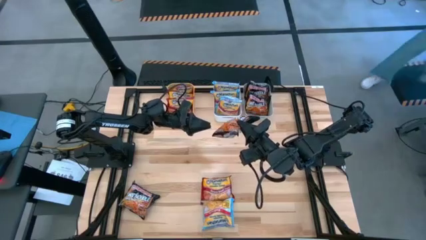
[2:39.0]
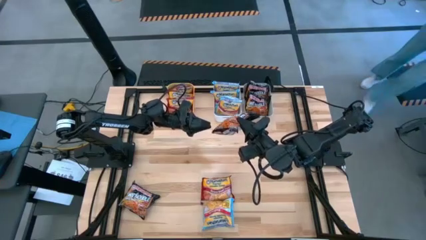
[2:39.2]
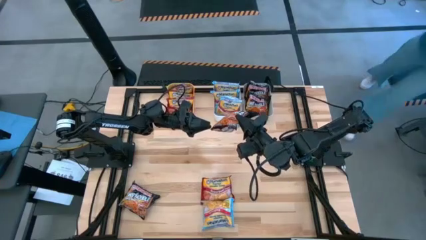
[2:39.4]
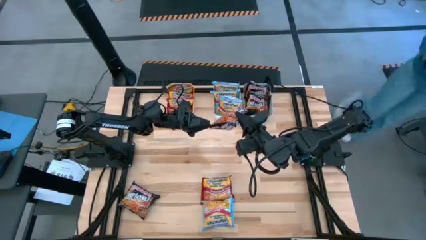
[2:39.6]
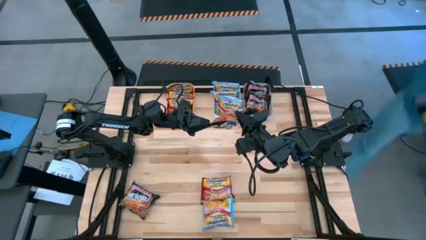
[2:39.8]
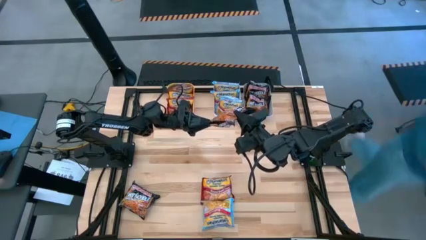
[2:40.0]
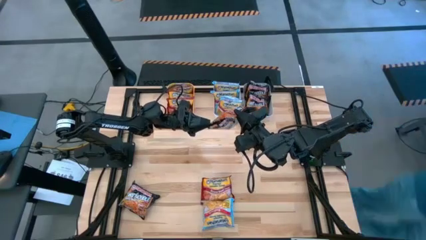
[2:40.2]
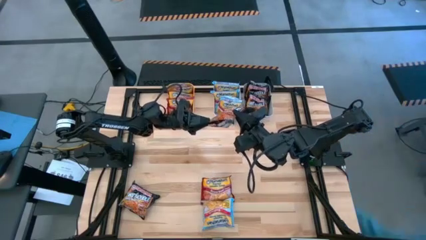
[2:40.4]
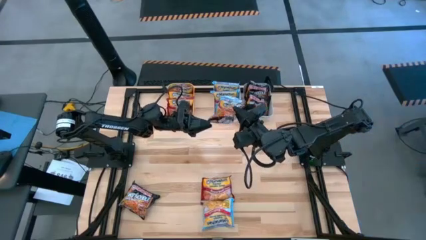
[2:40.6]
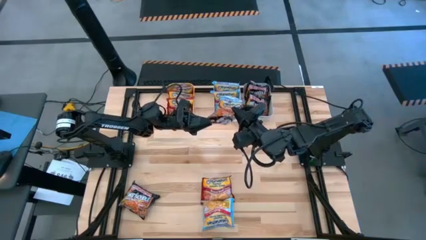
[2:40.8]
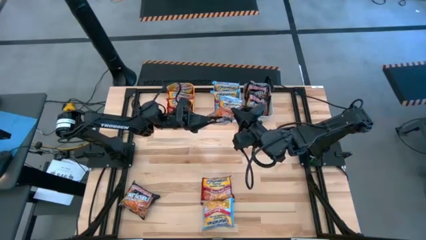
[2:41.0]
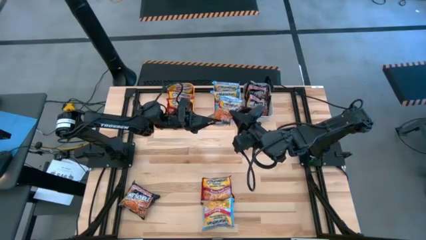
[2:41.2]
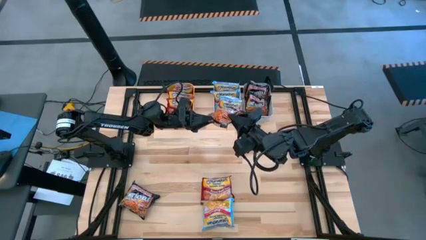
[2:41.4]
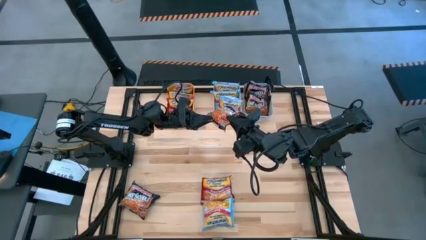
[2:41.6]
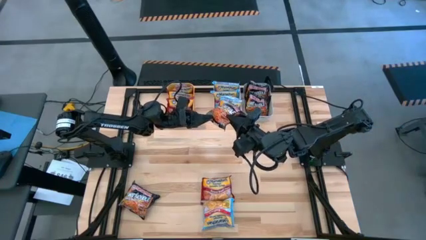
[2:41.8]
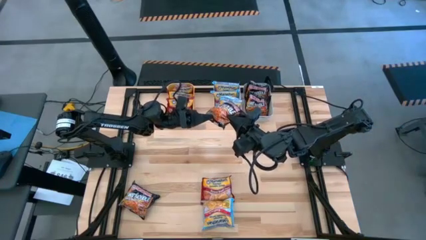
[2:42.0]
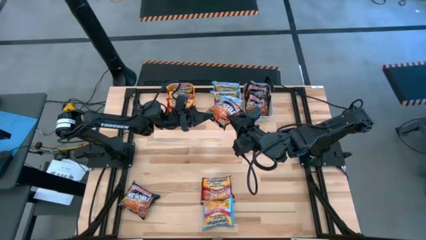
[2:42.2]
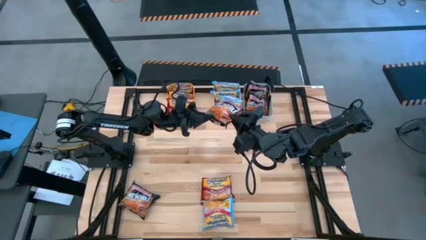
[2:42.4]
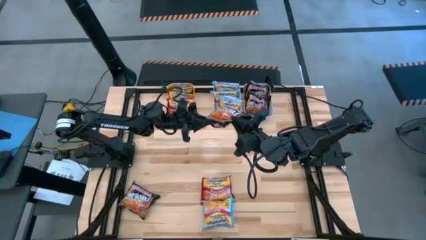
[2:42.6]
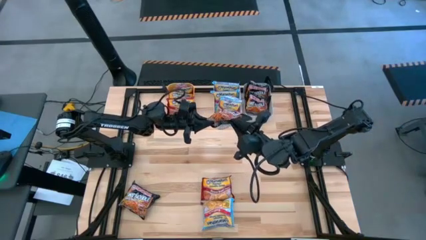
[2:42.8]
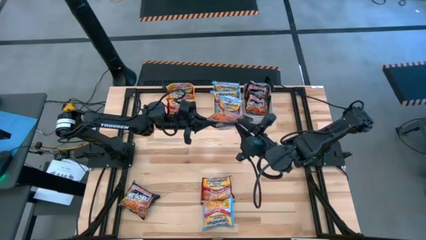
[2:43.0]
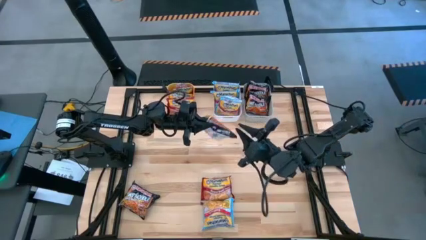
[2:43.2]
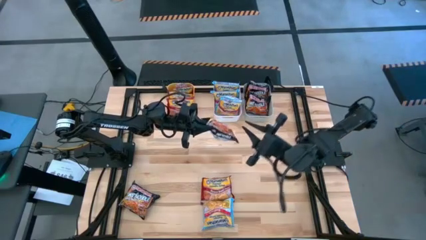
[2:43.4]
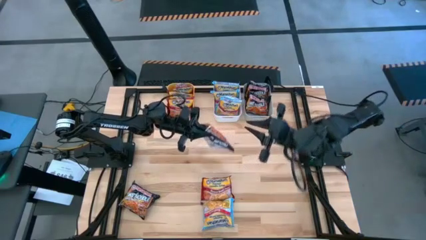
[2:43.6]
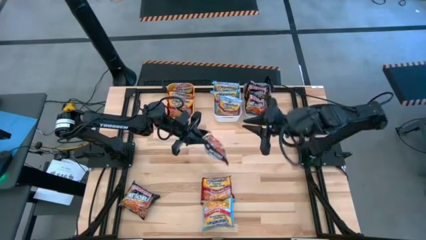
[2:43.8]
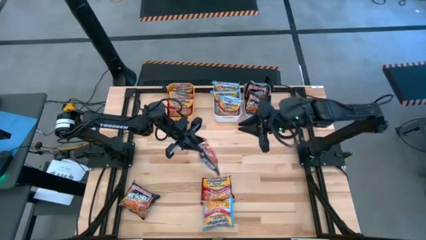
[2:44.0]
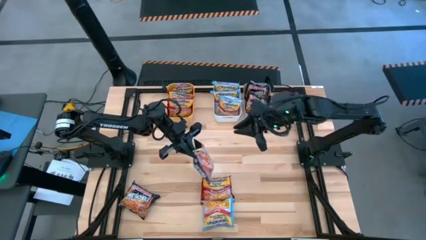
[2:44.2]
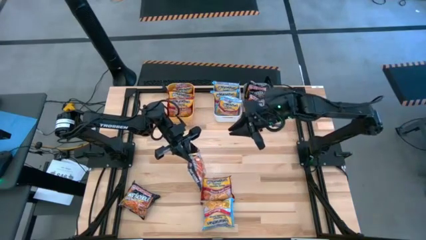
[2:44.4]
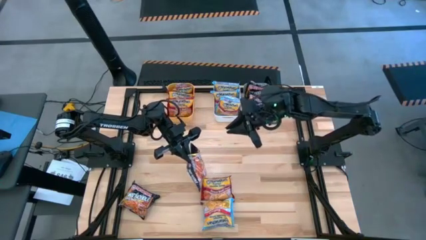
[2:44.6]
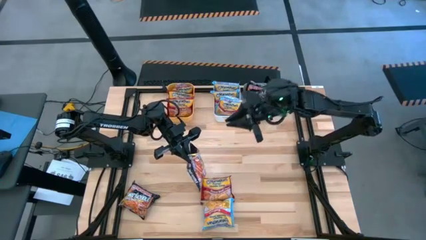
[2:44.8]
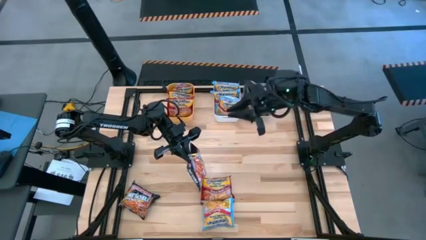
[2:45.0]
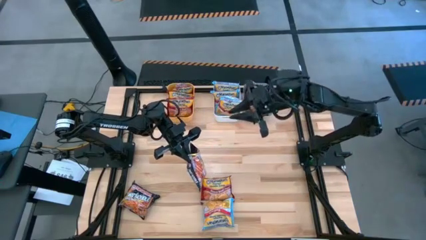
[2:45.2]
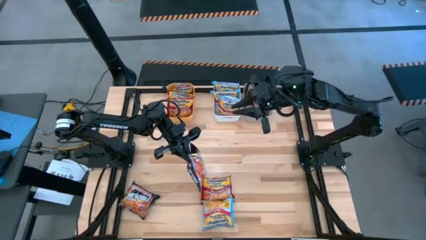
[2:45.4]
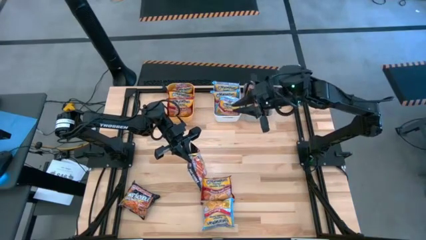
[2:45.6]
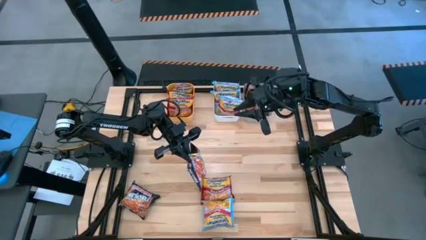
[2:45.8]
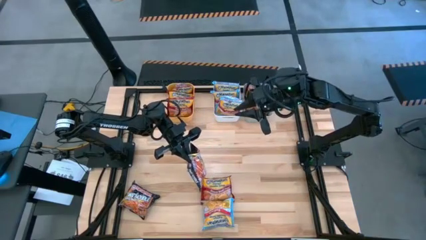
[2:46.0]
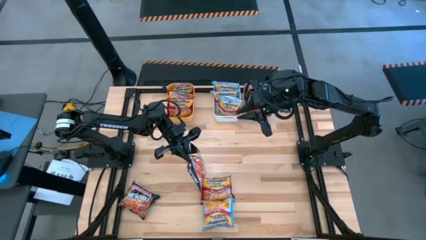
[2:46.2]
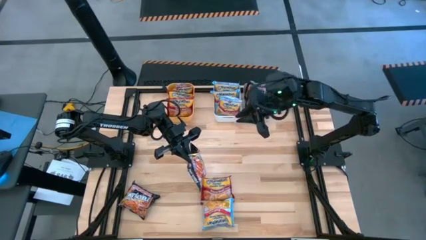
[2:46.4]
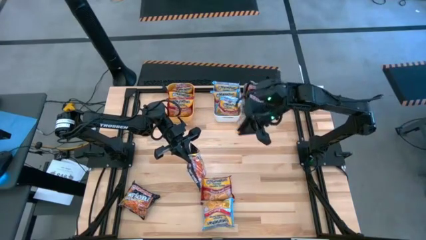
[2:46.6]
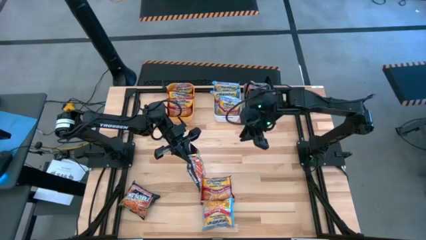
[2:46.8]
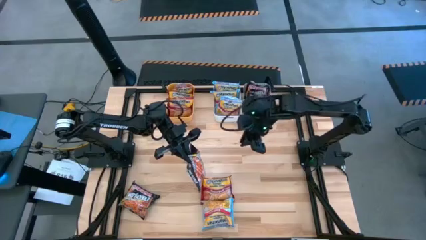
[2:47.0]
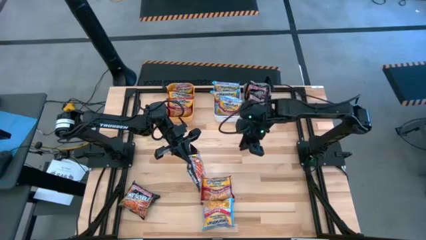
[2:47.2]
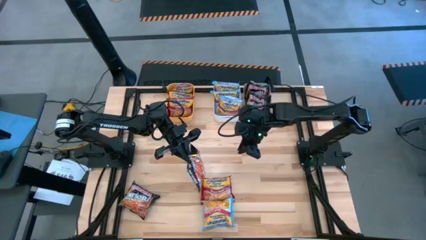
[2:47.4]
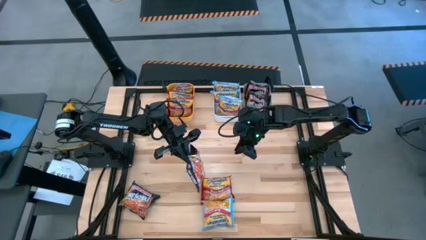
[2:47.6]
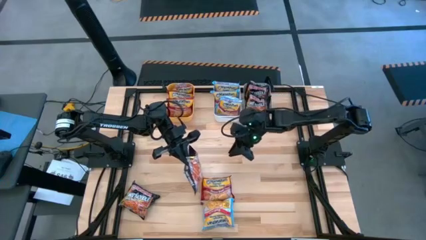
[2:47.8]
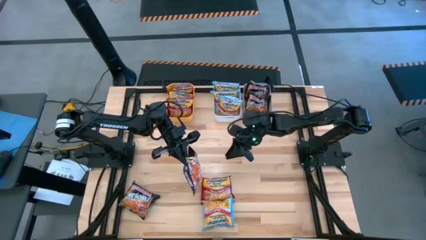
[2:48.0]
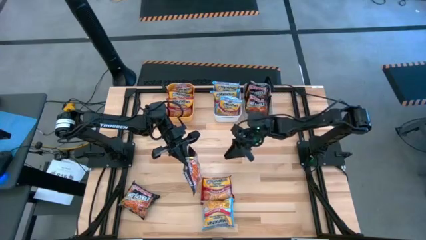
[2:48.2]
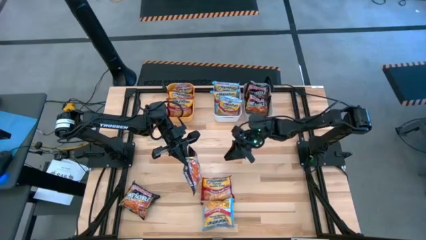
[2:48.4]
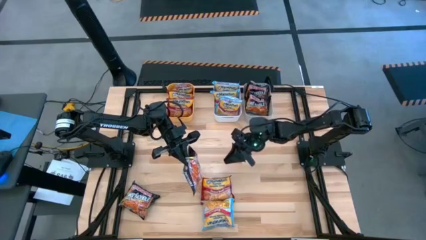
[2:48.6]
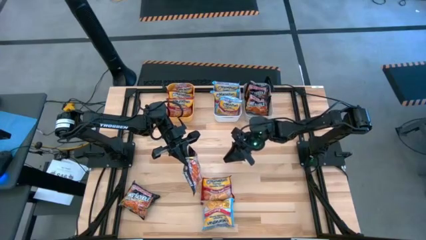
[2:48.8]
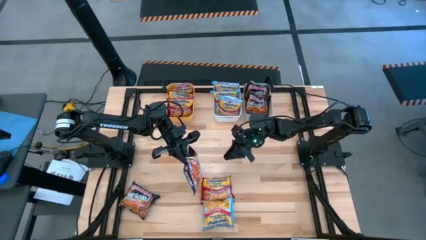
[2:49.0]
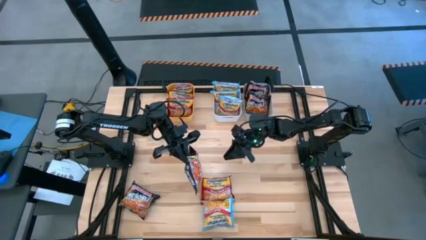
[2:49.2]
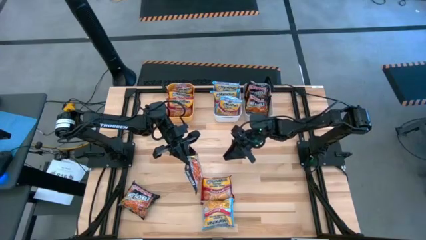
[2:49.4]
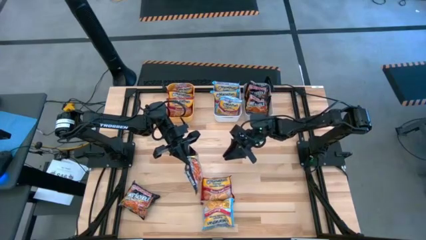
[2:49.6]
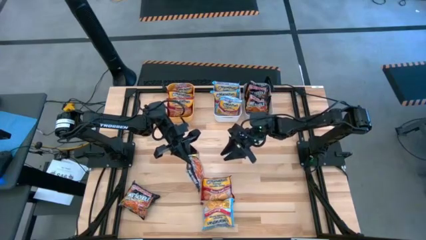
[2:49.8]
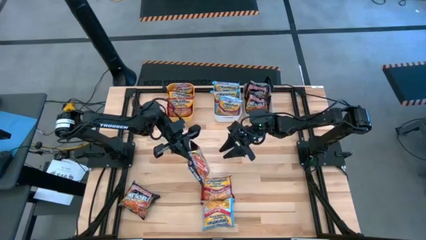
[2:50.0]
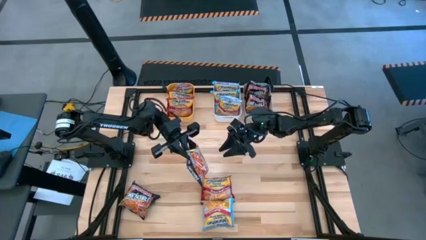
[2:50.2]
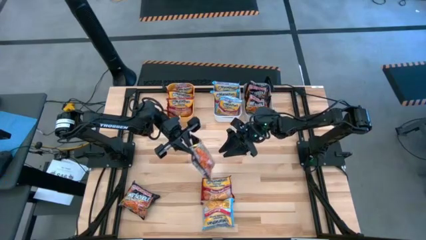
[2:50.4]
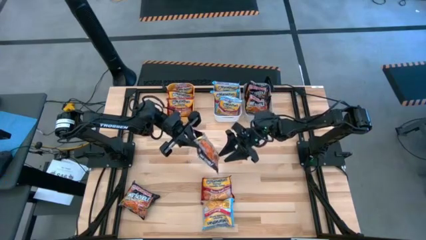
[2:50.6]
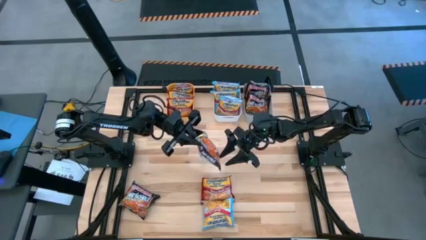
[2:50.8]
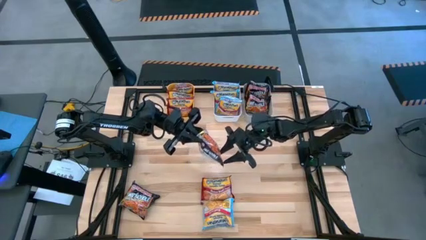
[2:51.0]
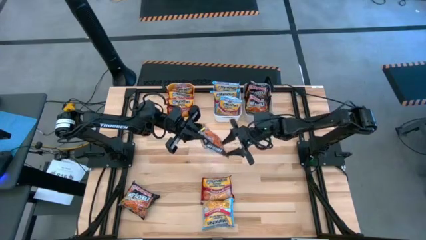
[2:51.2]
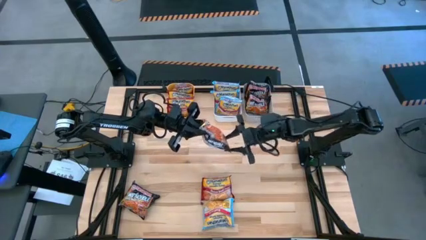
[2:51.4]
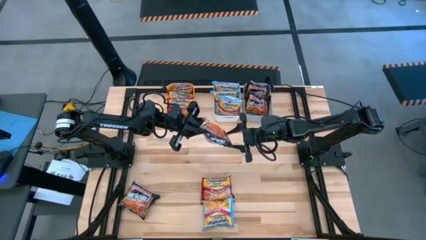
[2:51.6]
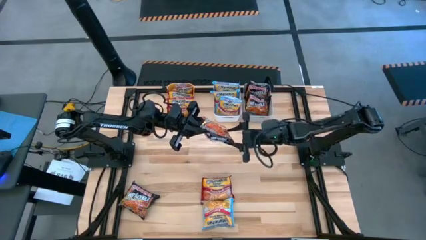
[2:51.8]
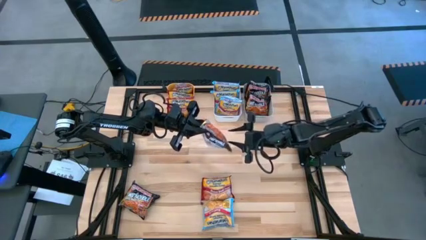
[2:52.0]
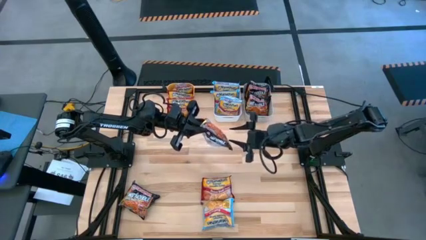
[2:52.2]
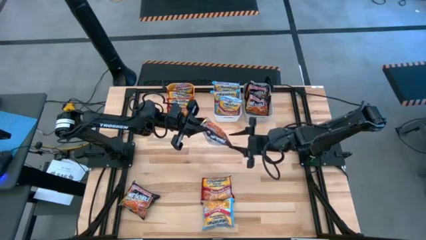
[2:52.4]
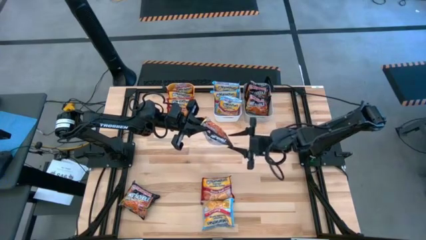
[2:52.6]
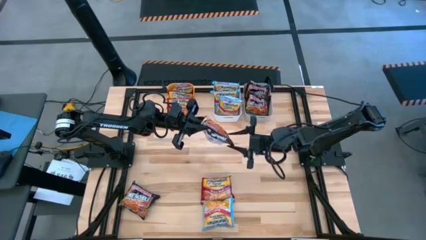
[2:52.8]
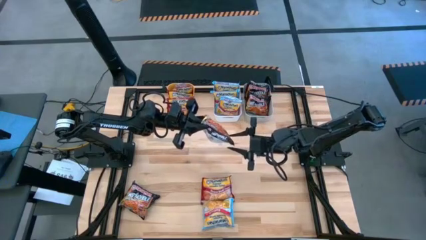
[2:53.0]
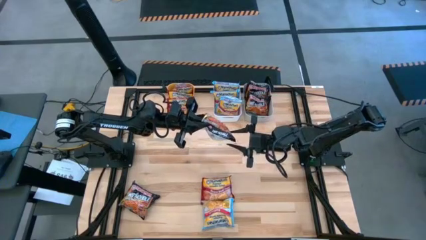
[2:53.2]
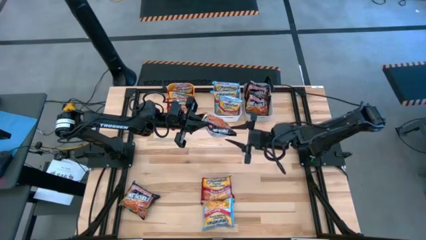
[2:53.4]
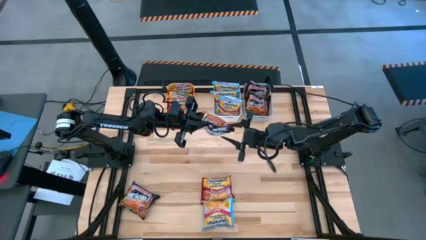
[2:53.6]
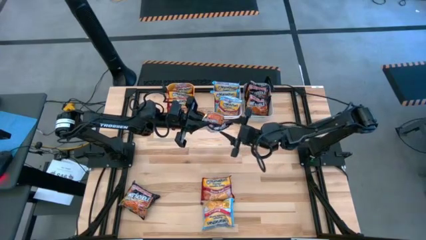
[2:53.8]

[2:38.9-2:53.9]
Task: Sort Maruchan noodles
Put the black noodle pack into the gray bin

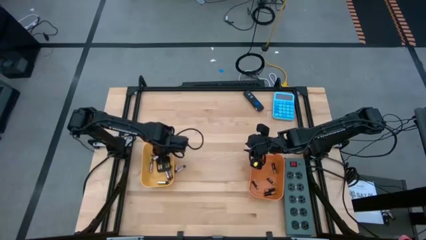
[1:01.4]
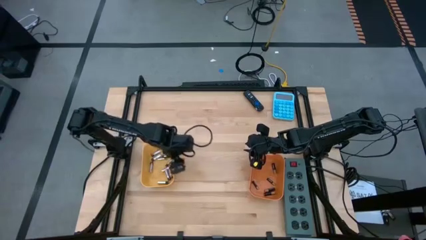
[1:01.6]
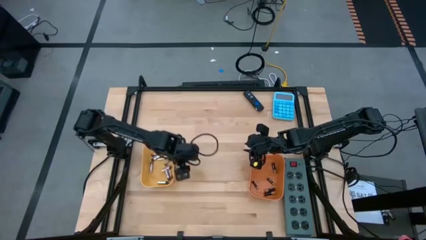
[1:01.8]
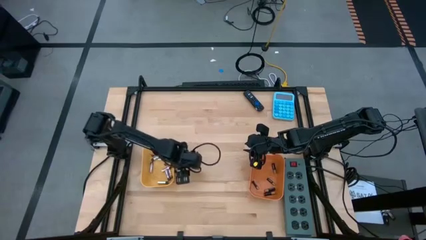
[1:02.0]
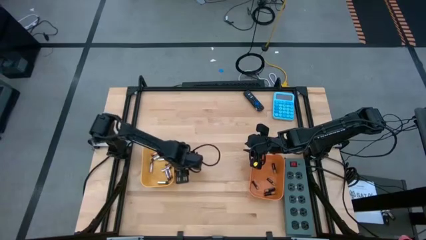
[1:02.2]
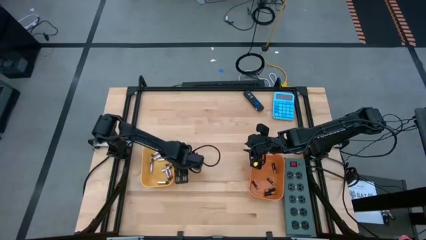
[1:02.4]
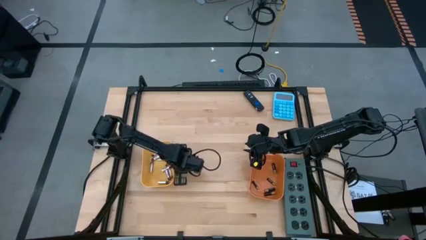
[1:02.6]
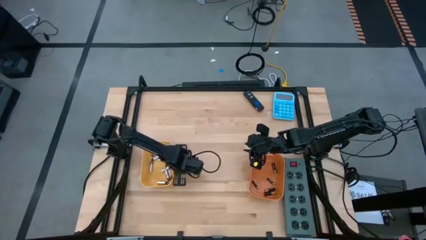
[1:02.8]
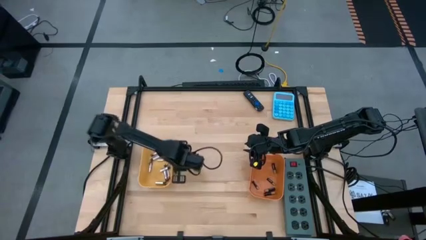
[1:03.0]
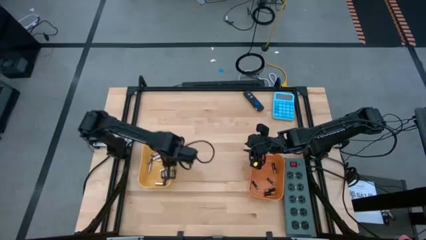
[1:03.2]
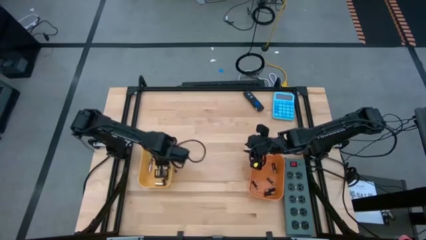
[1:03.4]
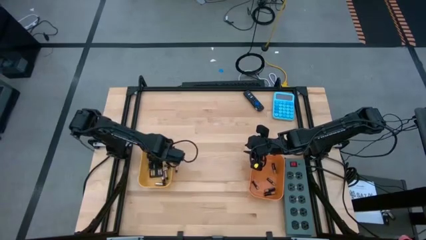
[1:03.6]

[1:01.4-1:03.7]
Task: Sort batteries
Put the silver battery into the yellow bin
